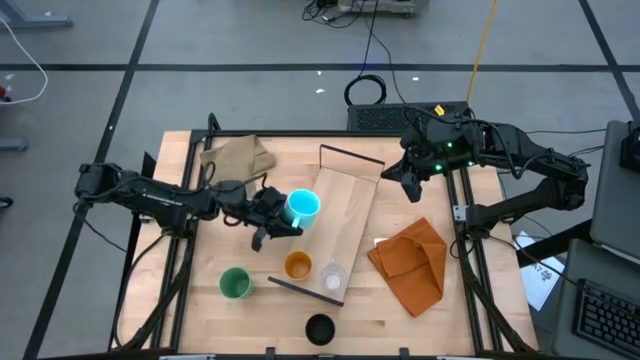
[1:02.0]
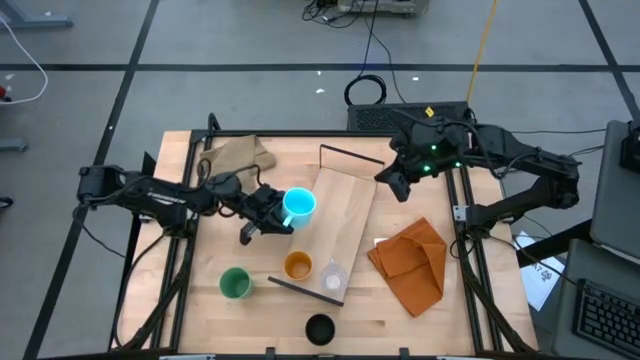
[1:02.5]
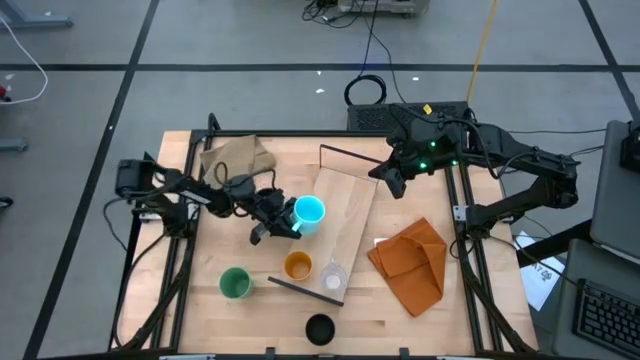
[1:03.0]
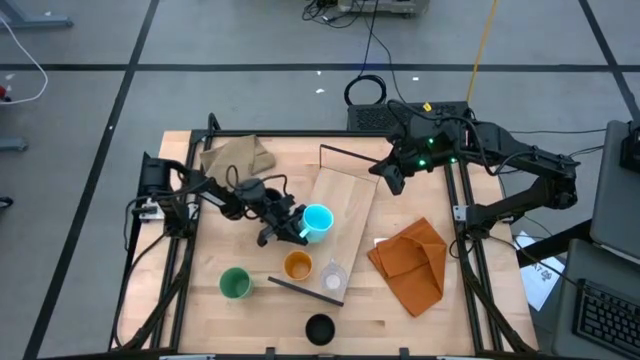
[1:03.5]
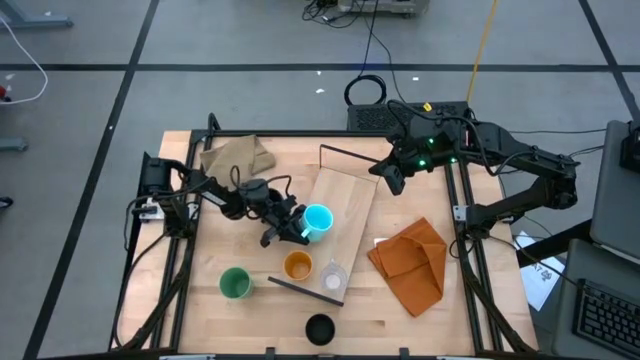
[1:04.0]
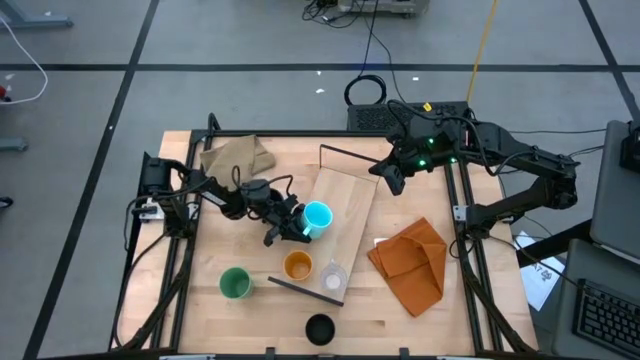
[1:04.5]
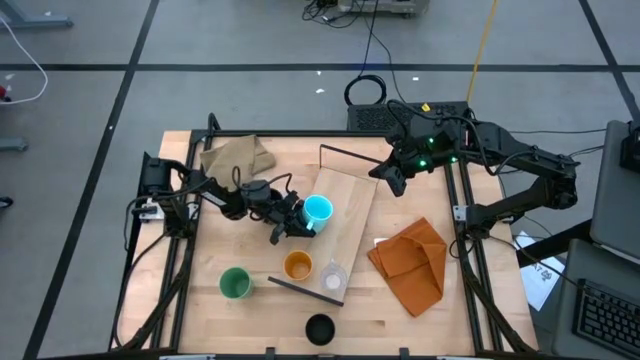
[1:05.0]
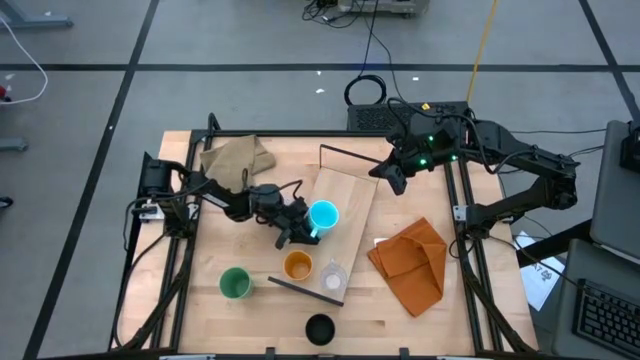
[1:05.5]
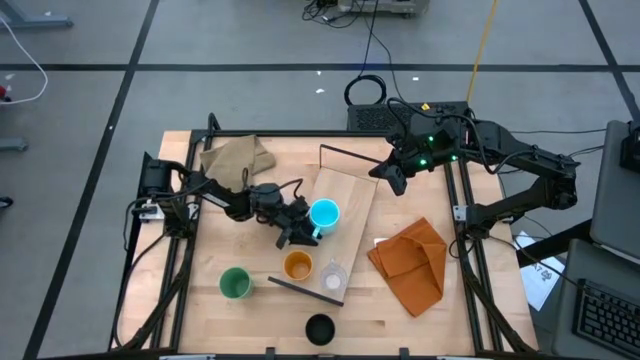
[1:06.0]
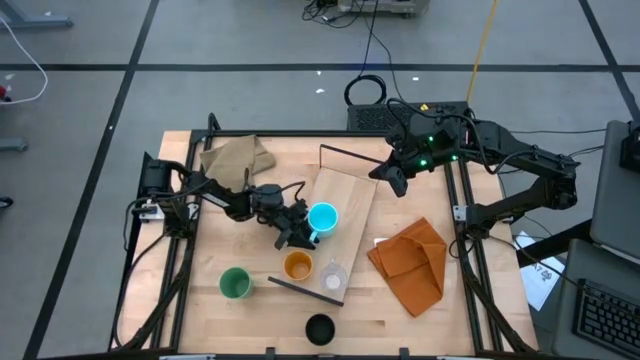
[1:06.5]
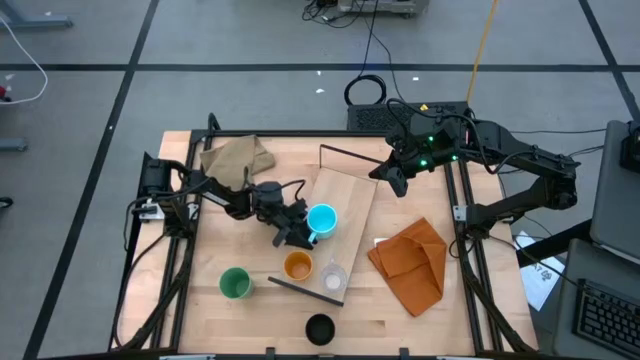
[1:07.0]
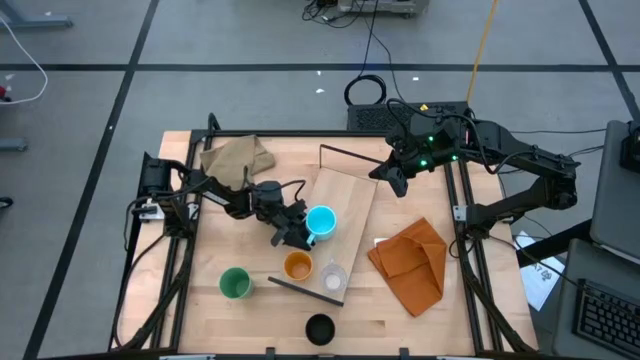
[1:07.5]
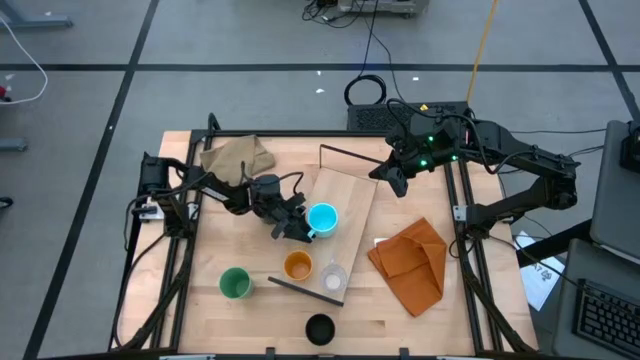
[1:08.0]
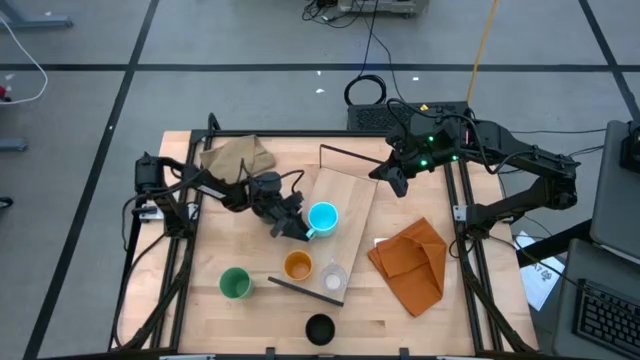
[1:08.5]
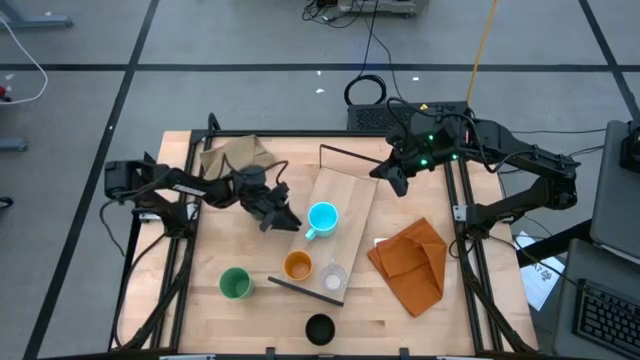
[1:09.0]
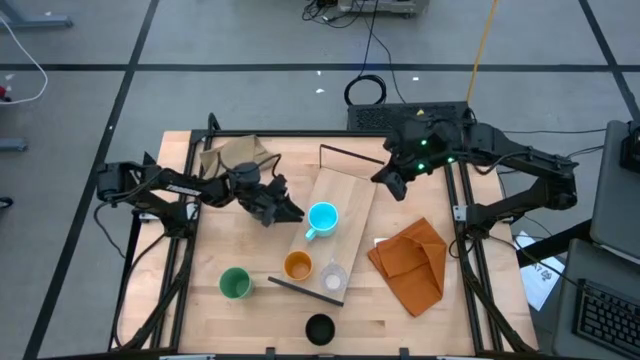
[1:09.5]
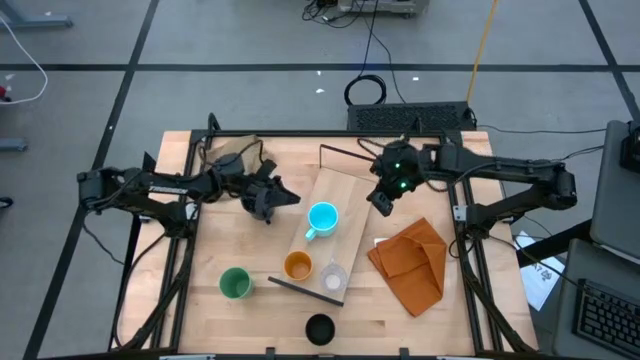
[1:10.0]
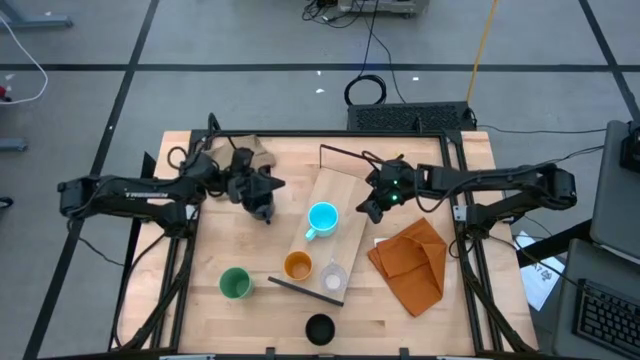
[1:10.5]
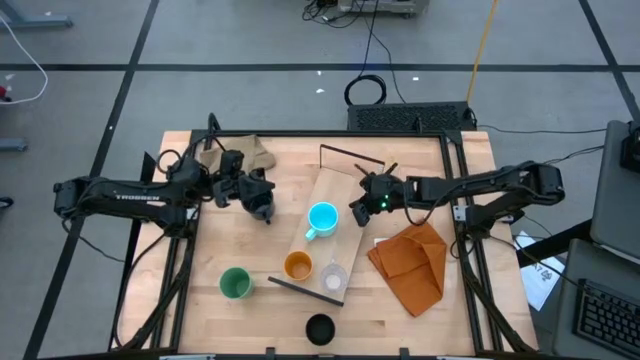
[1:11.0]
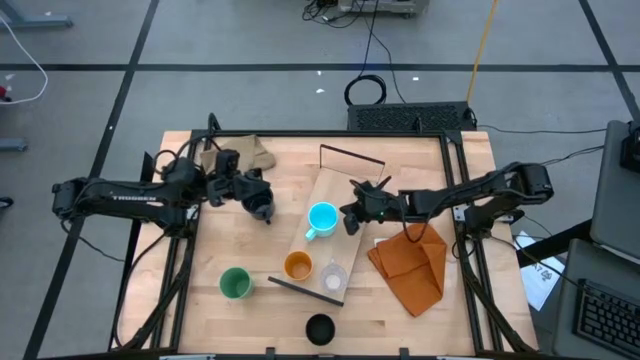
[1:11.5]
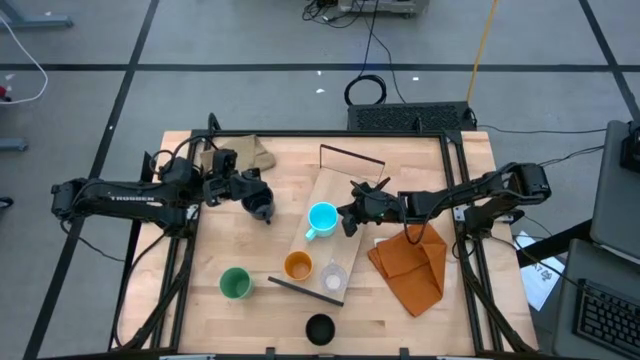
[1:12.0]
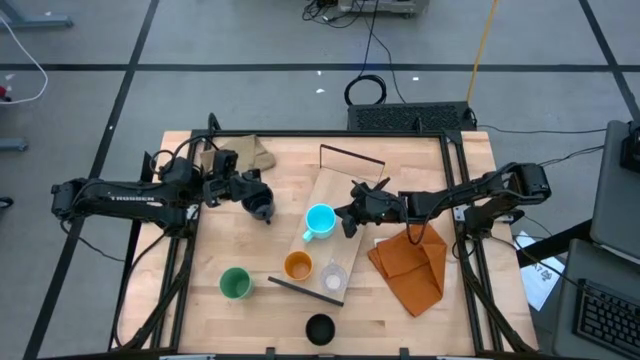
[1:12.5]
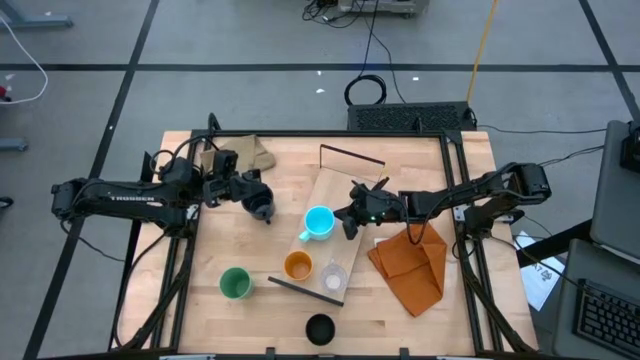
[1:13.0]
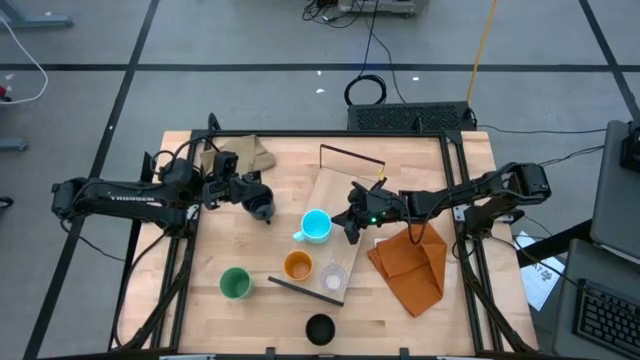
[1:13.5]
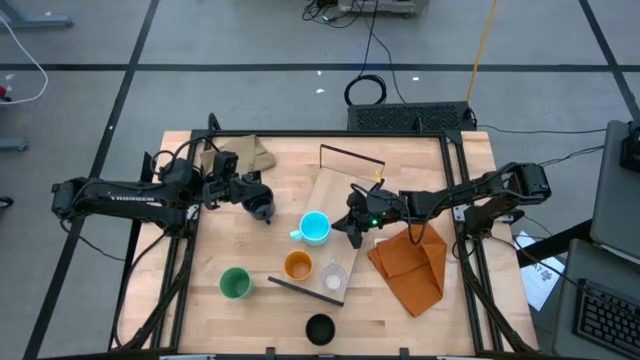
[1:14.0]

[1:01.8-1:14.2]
Task: Stack small to large cups/mugs on shelf
Put the light blue mug on the shelf

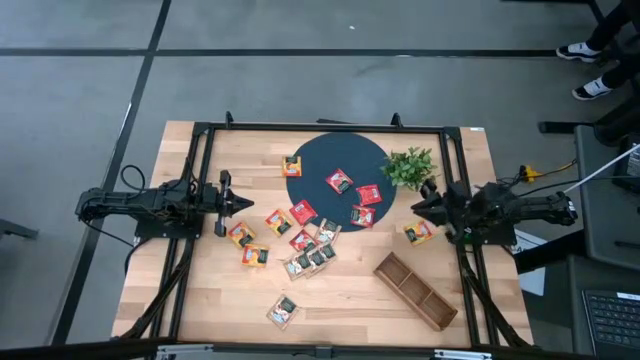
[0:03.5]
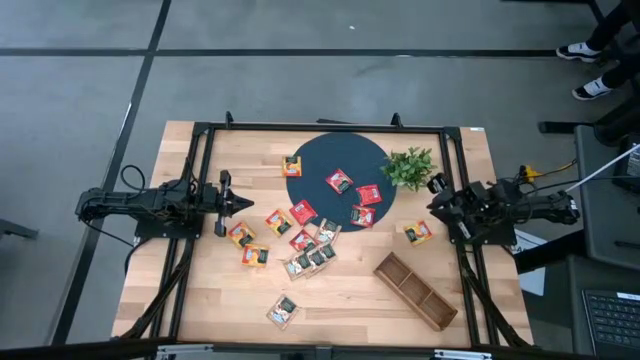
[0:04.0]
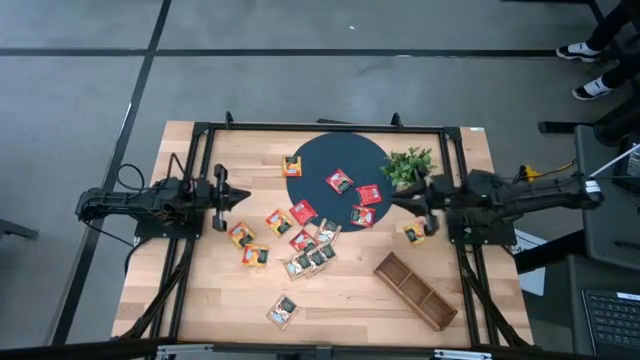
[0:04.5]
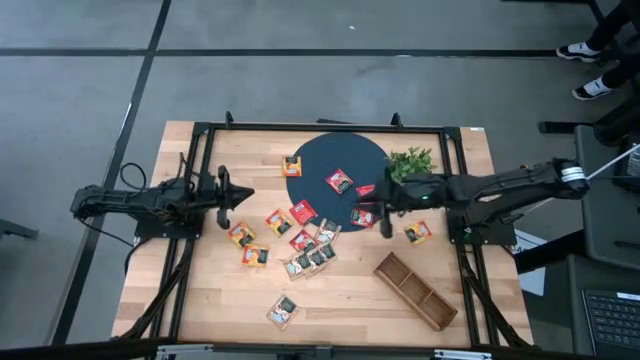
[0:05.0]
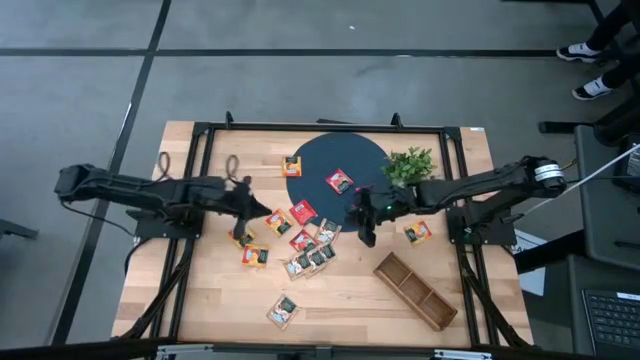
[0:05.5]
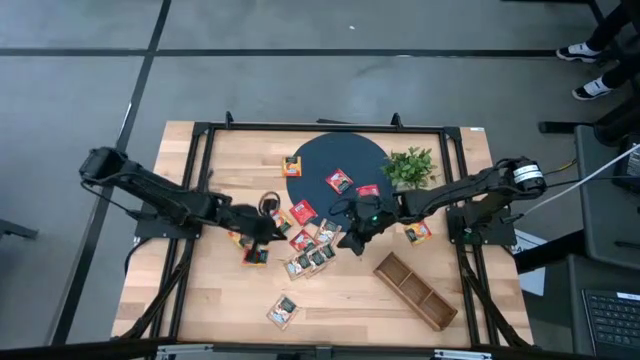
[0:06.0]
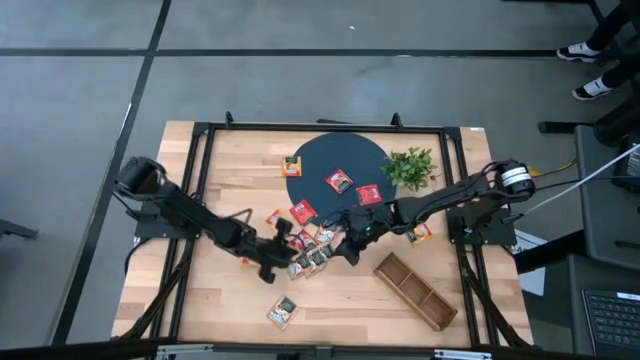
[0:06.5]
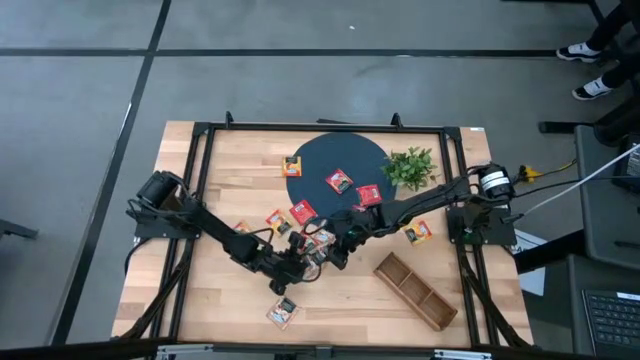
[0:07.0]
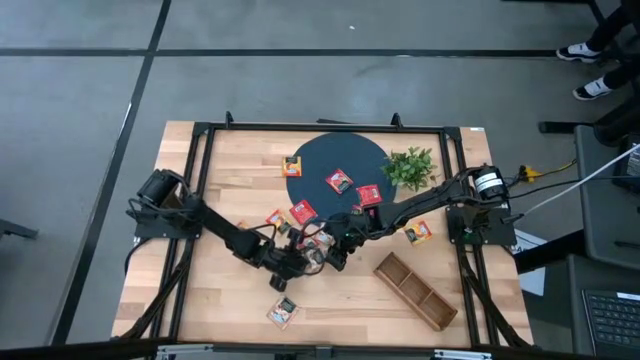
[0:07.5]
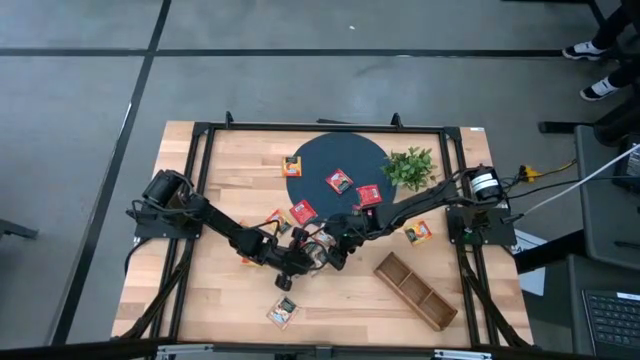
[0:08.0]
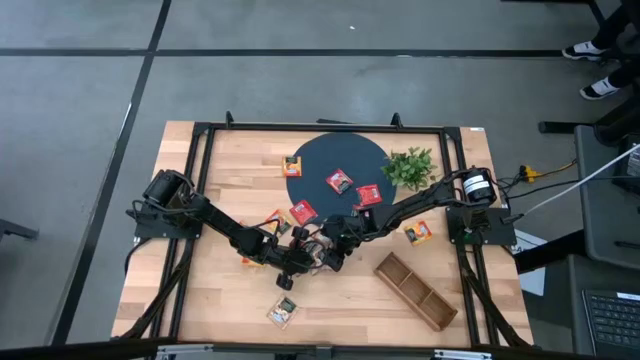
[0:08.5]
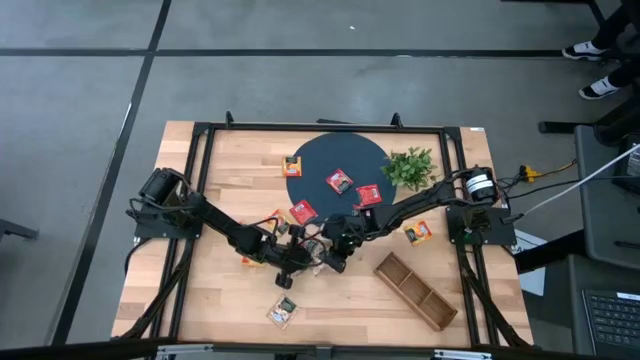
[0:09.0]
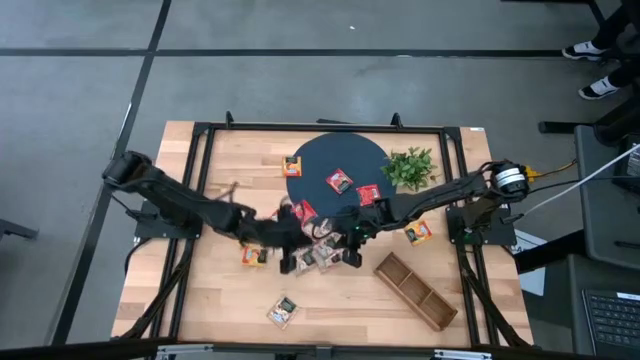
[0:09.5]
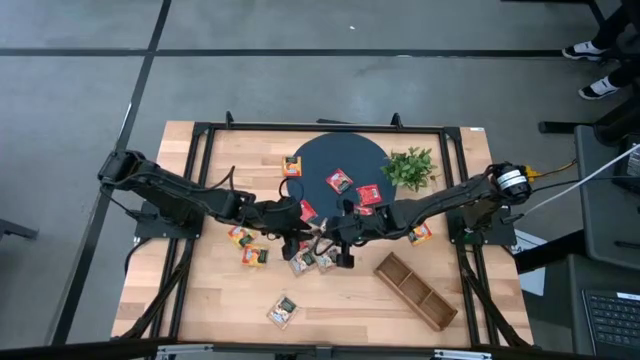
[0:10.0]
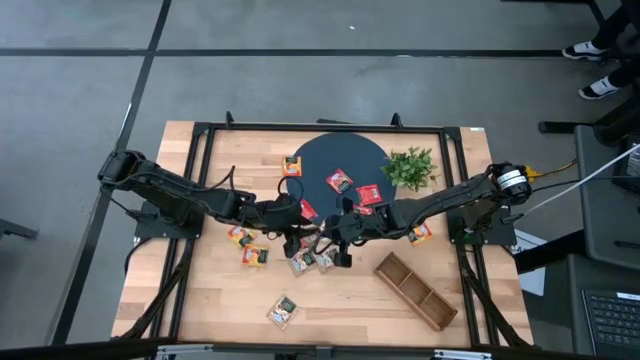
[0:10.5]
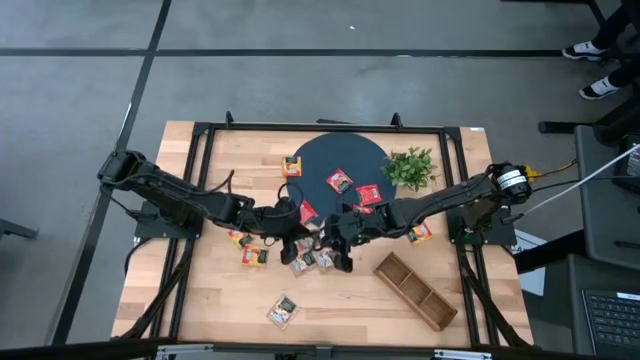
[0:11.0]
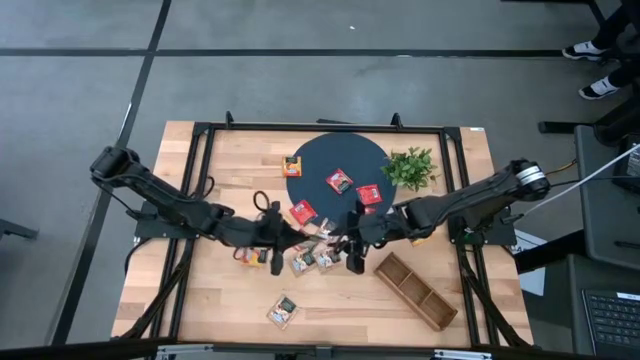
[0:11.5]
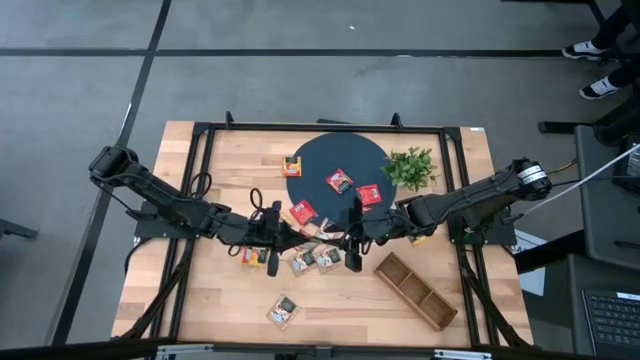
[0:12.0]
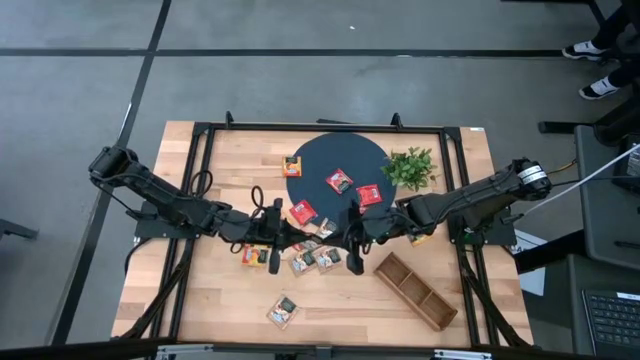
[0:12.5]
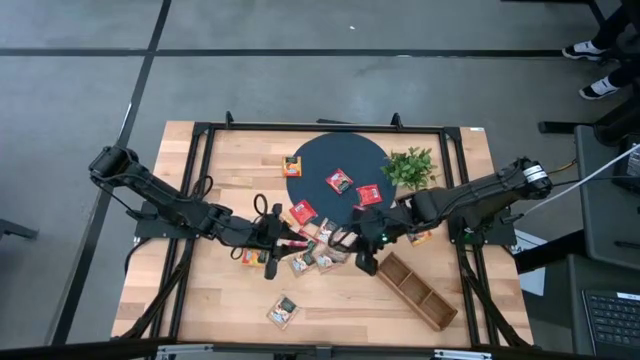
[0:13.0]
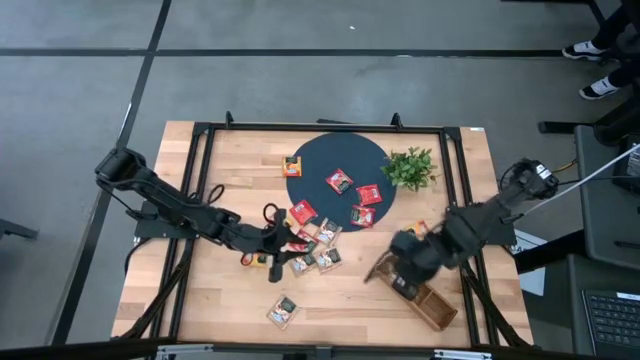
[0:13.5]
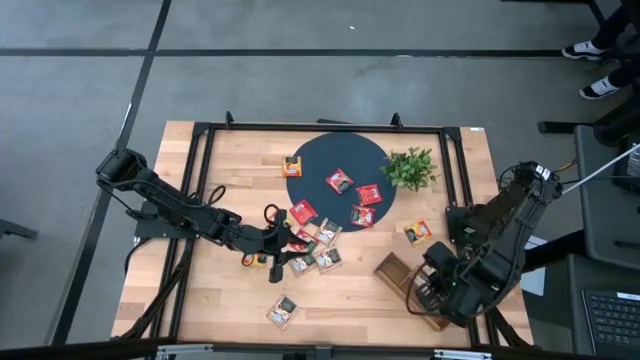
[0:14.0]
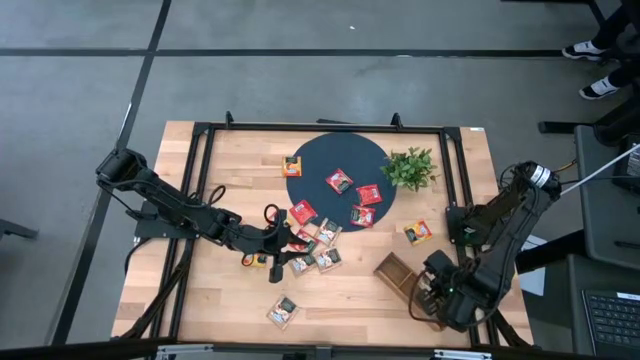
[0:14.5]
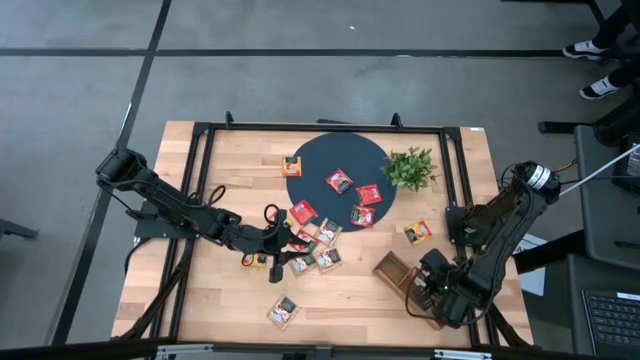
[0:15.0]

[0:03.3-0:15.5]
Task: Pick & Place Tea
Put the brown tea bag into the middle section of the wooden organizer
